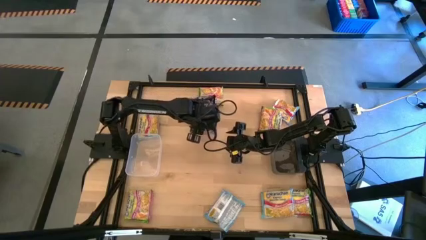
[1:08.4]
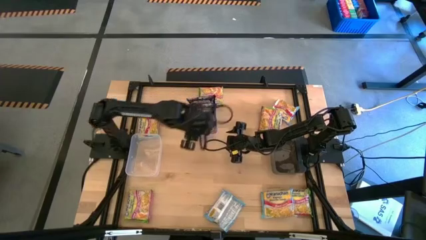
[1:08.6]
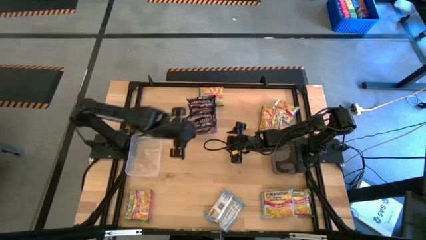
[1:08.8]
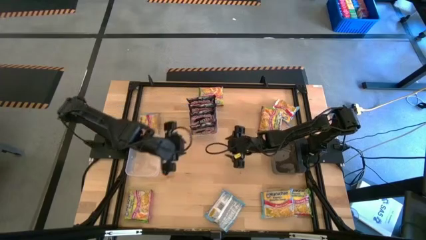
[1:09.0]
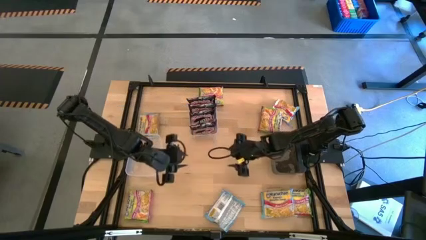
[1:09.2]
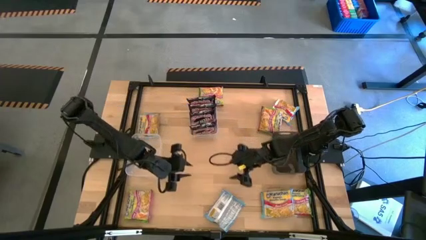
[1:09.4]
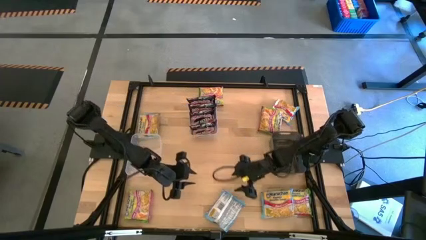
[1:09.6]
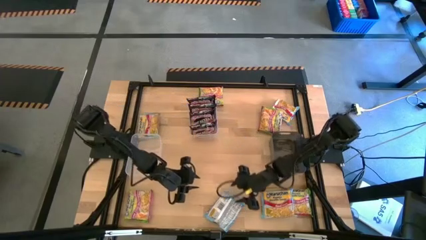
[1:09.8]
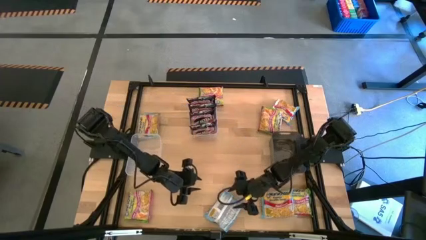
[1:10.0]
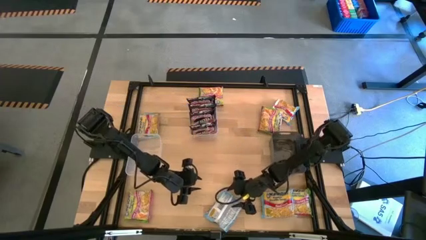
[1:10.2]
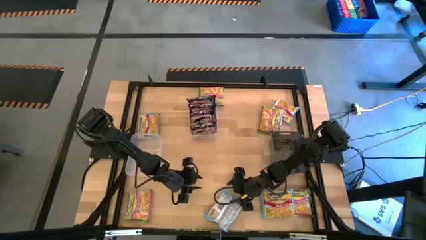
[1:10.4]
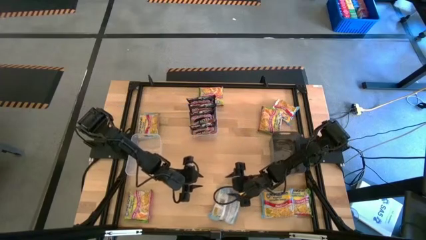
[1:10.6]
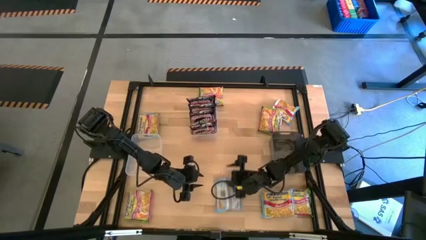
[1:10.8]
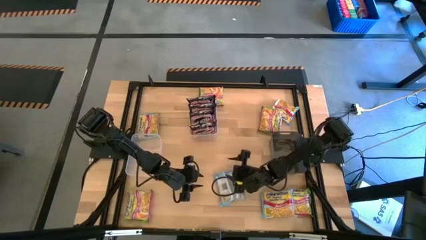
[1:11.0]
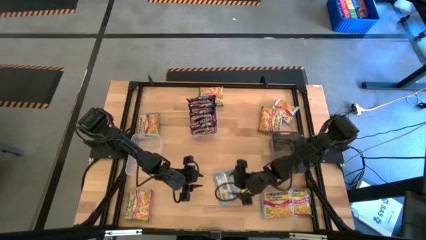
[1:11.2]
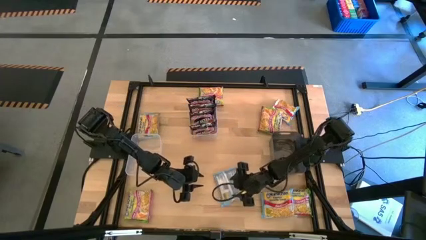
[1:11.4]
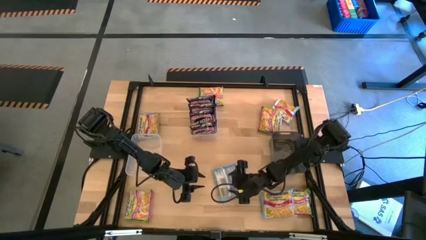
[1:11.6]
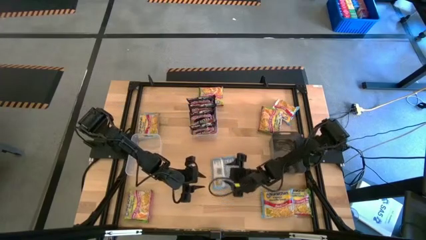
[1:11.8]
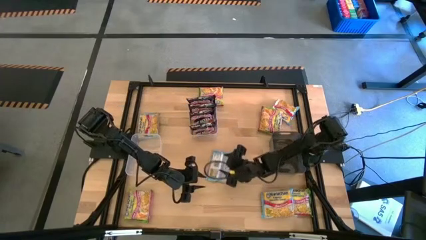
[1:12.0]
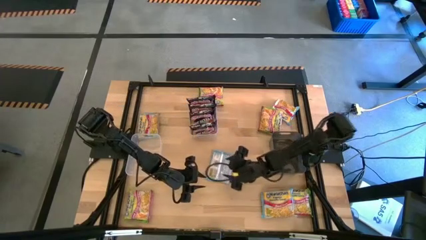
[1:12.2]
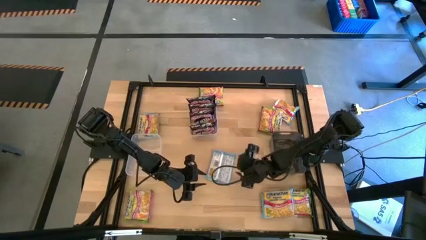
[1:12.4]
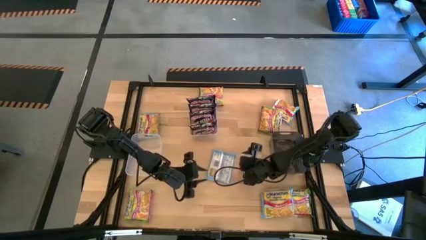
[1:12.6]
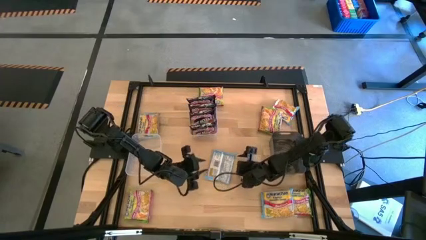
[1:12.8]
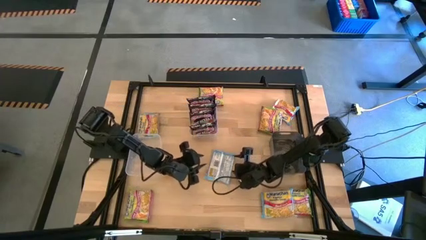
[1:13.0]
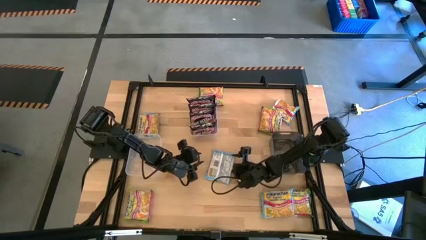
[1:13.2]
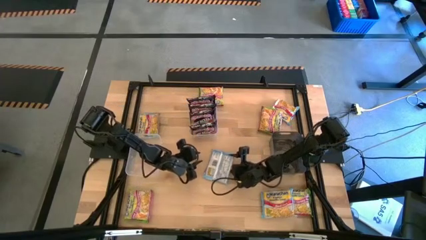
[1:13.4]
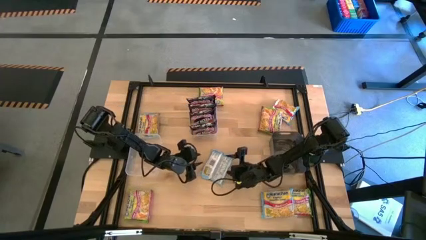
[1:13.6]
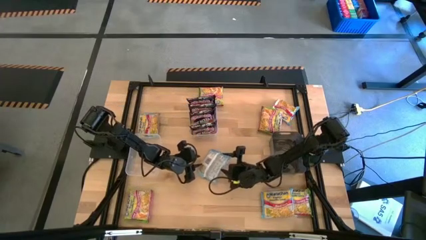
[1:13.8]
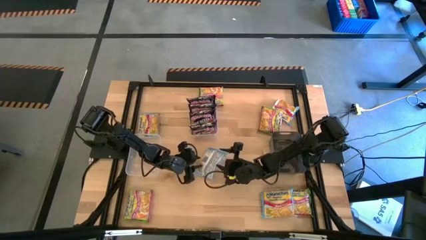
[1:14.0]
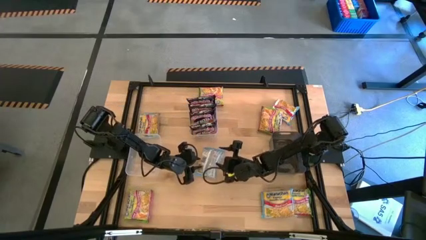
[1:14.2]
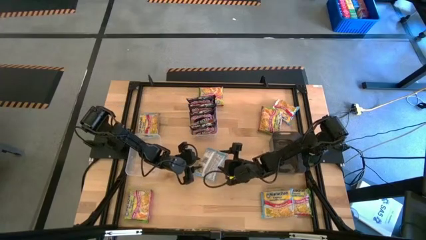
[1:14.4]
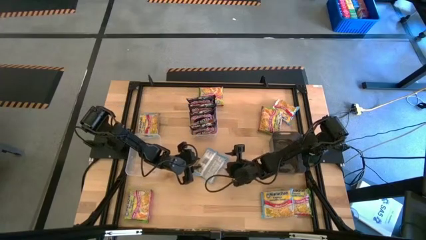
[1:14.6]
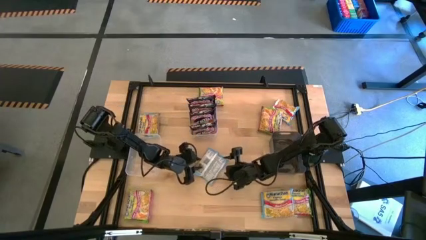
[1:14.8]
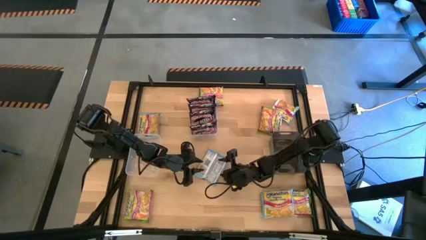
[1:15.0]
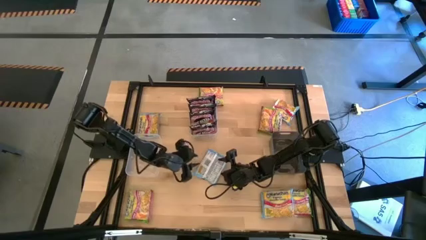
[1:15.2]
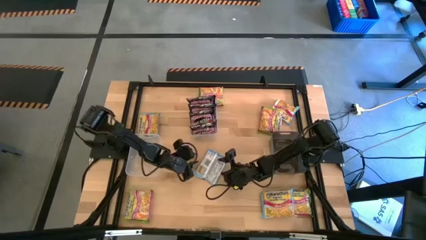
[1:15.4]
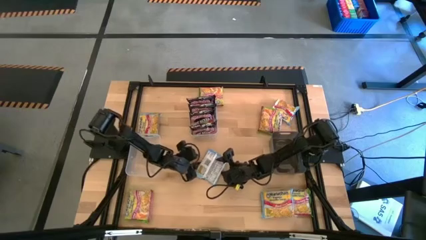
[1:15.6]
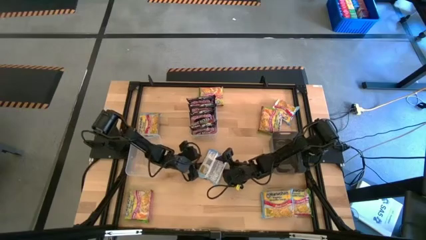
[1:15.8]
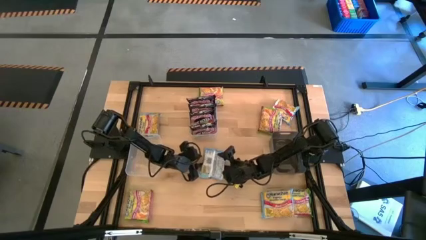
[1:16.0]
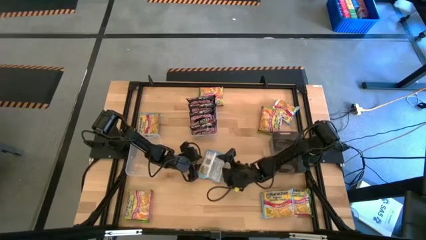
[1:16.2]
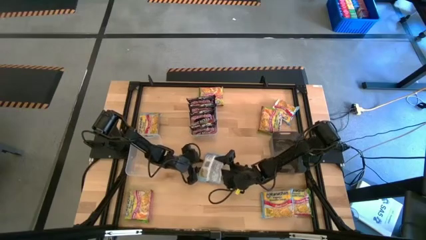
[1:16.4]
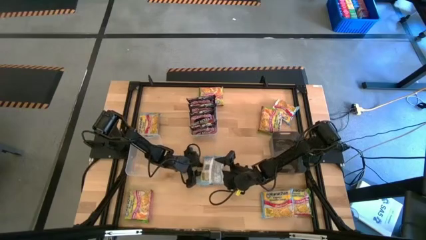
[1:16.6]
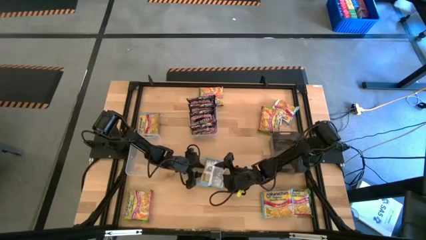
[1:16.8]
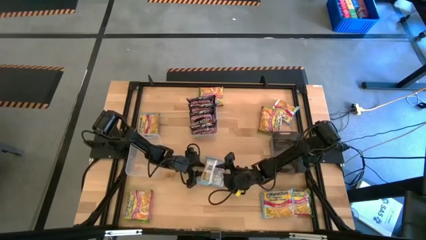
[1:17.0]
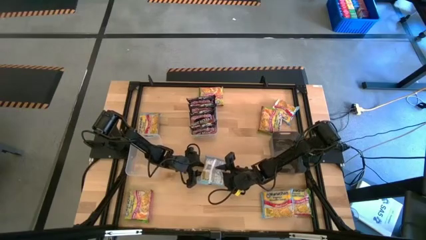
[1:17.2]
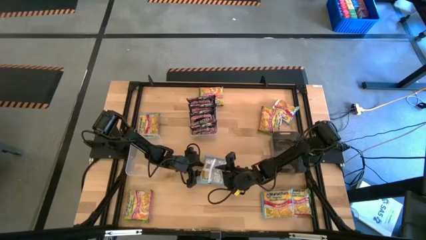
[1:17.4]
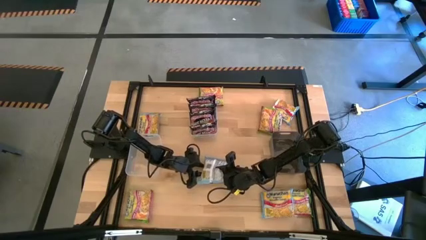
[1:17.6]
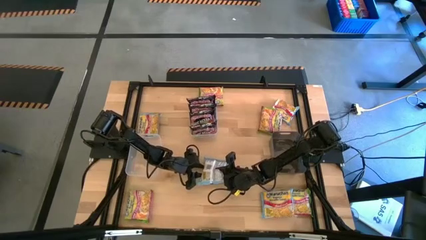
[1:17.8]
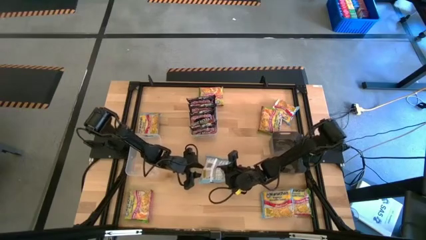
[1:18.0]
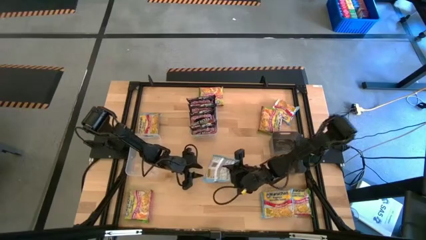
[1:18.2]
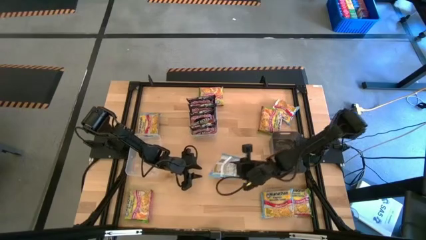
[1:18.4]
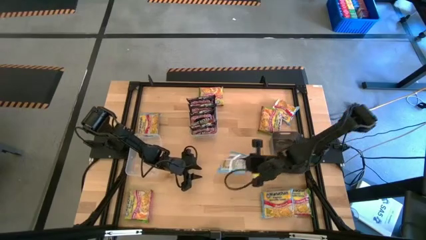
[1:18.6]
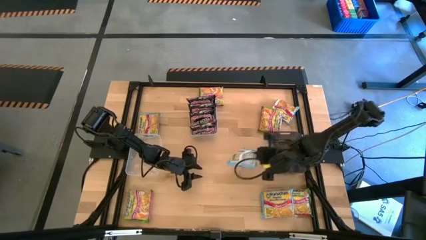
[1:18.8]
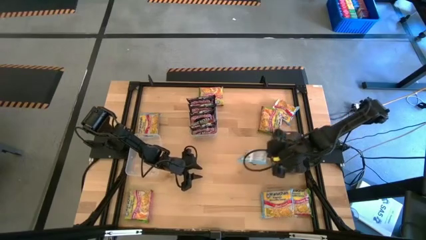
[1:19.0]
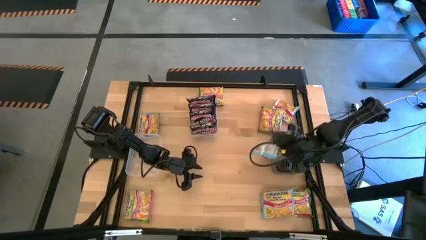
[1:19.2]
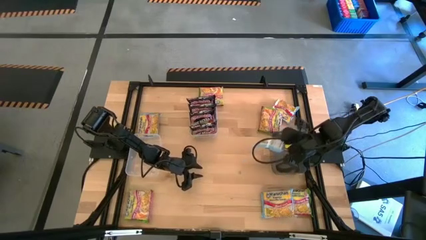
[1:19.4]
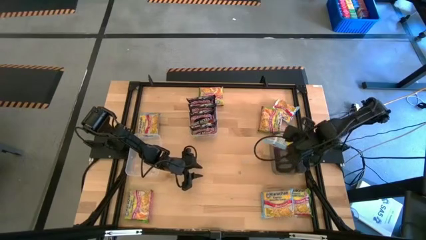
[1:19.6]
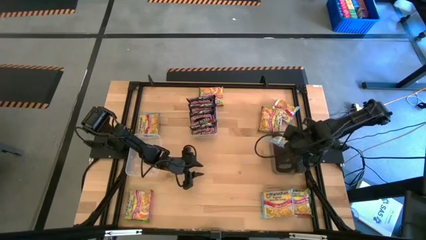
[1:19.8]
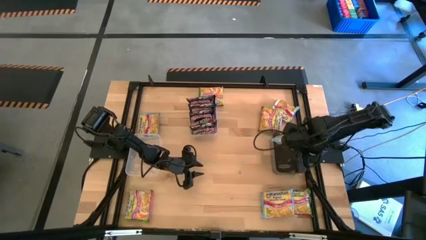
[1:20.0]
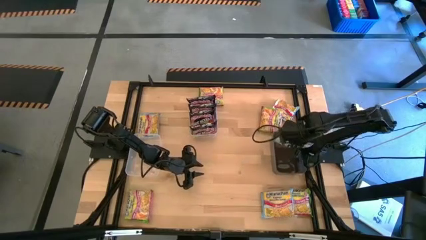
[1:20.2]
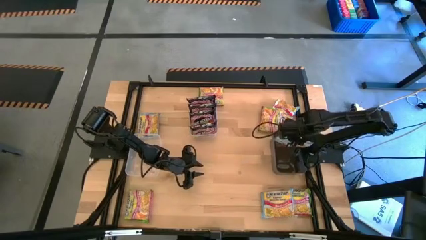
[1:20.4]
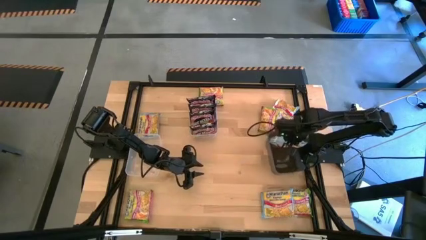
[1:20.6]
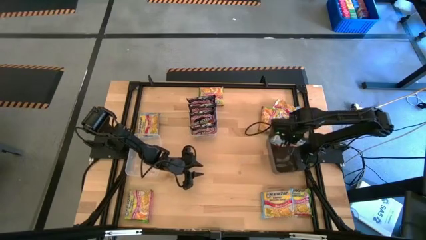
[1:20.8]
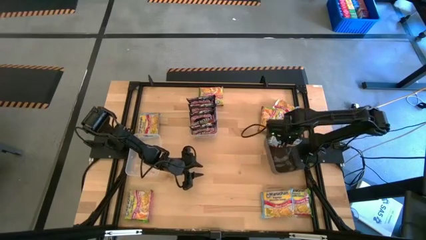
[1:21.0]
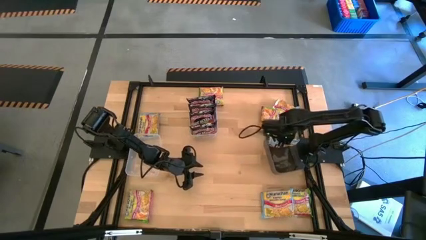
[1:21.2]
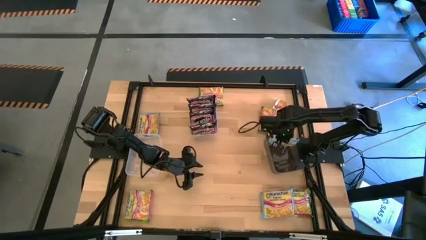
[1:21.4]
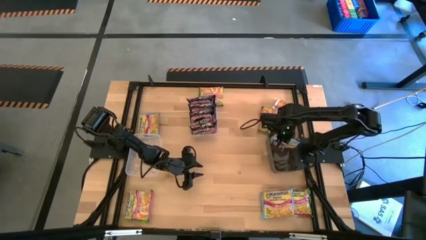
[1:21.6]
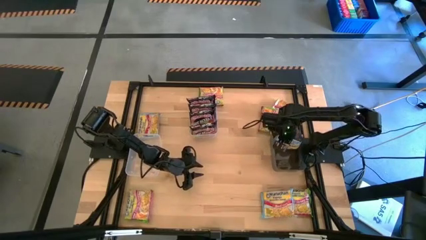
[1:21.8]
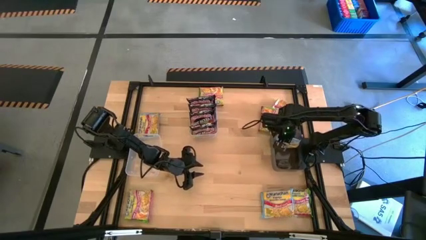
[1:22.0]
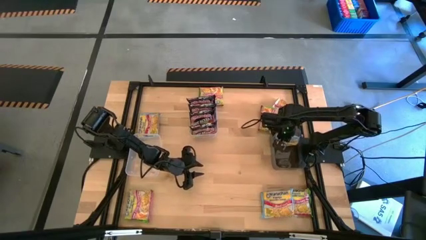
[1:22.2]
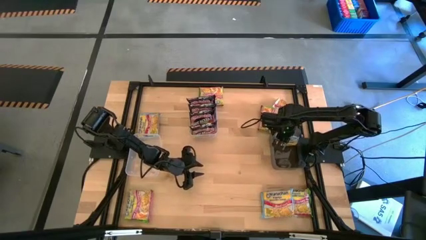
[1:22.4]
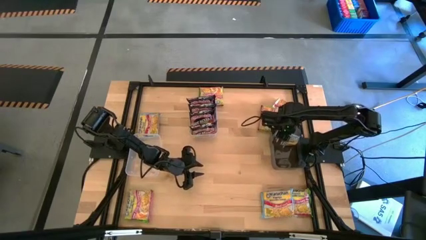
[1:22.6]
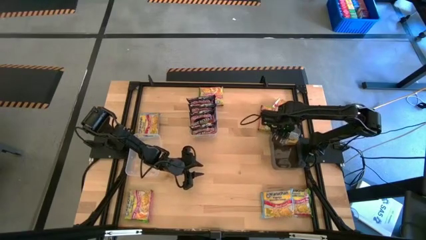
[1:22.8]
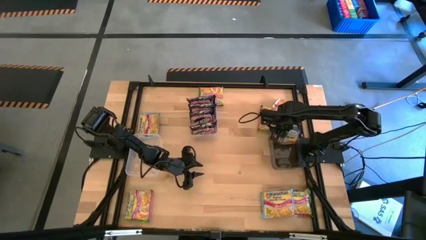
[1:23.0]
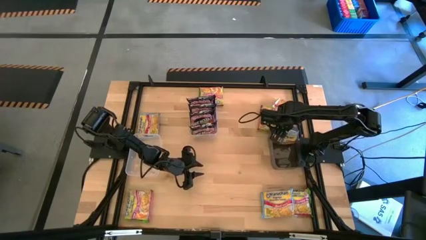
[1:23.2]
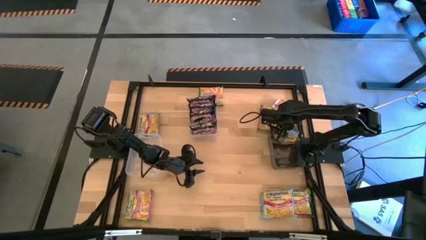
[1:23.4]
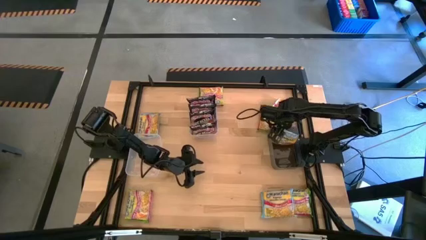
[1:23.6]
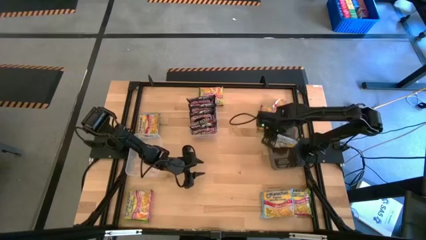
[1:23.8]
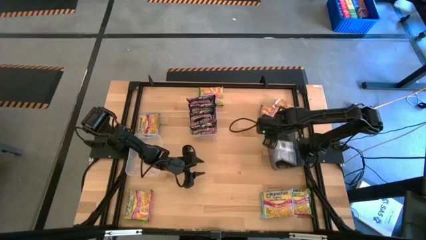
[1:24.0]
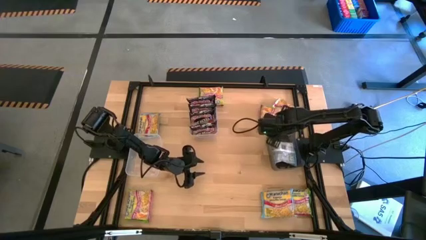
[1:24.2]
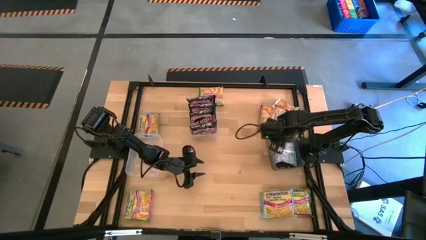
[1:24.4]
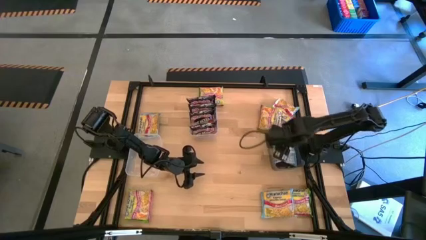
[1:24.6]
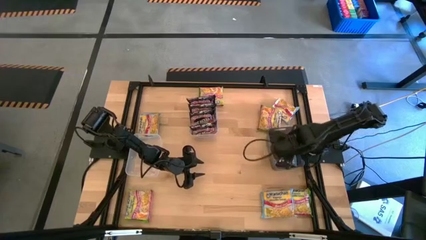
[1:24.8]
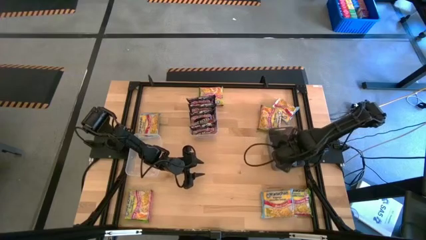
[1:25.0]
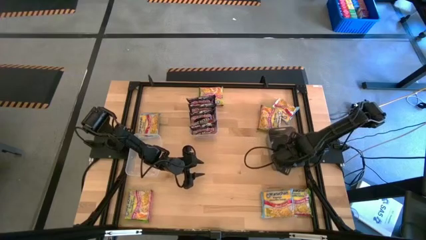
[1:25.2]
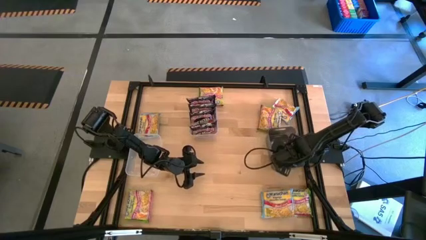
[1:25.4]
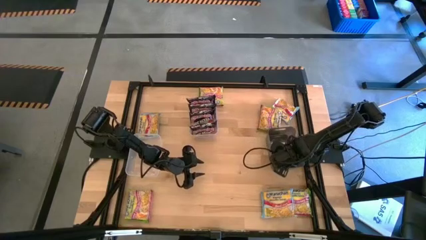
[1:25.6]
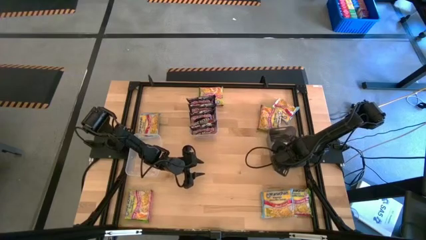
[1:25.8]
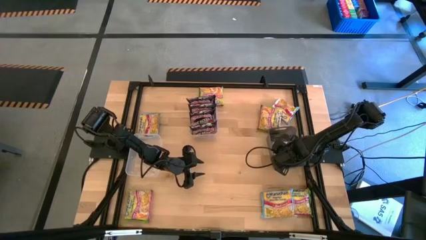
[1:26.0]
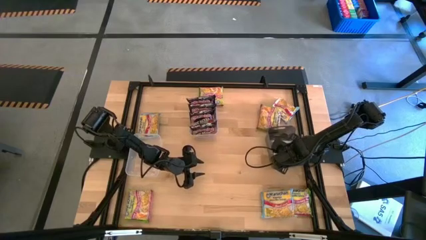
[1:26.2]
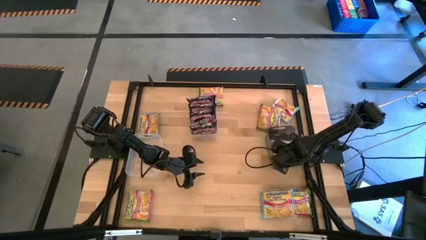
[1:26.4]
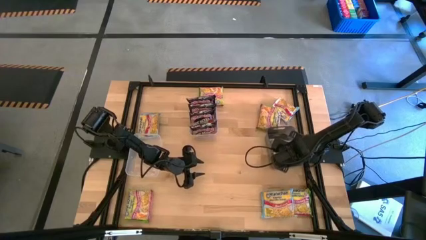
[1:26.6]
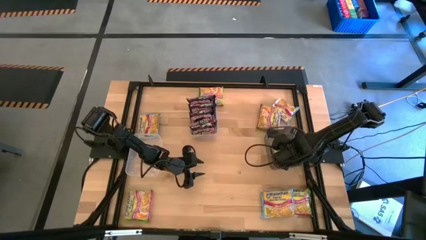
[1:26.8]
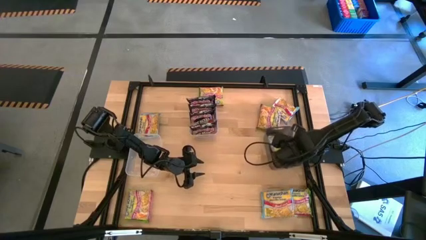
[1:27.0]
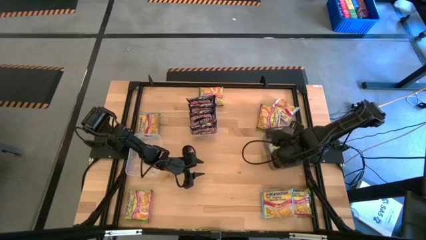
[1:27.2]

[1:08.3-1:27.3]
Task: Sort Maruchan noodles
Put the blue noodle pack into the black bin
